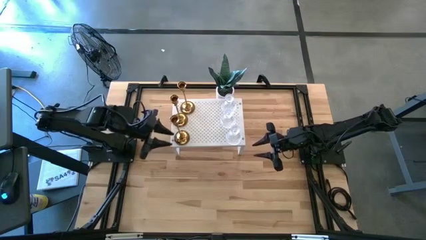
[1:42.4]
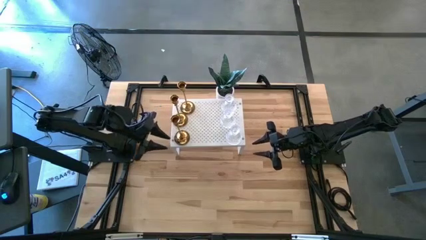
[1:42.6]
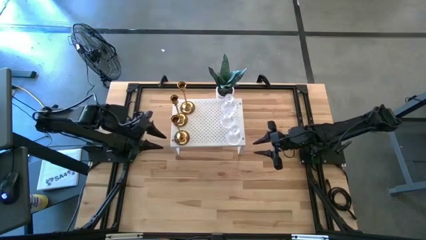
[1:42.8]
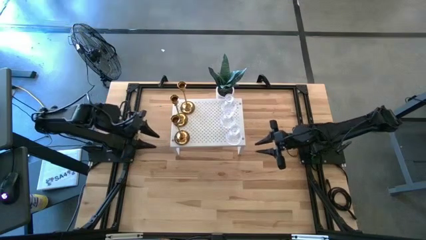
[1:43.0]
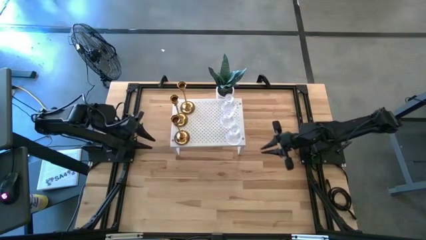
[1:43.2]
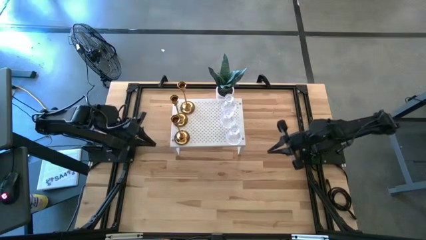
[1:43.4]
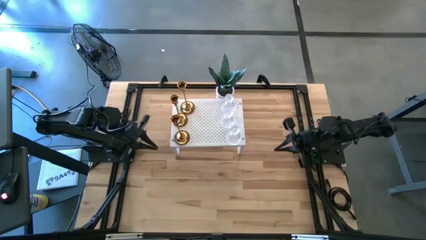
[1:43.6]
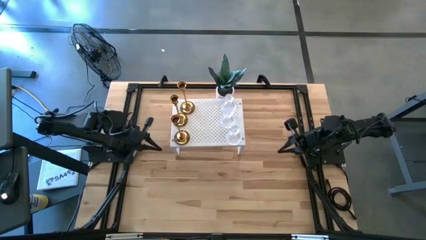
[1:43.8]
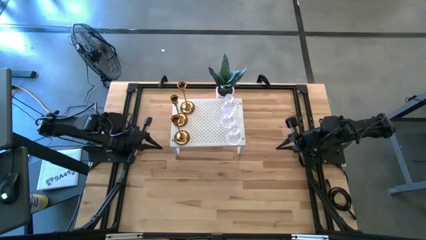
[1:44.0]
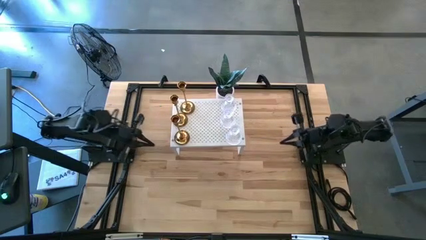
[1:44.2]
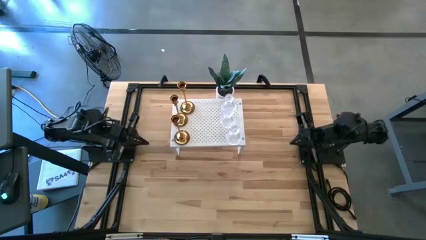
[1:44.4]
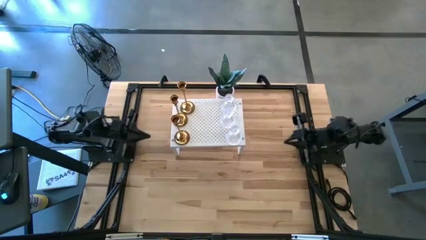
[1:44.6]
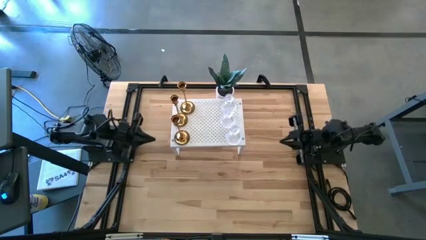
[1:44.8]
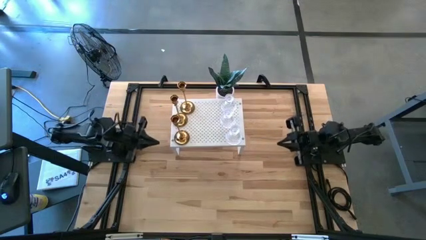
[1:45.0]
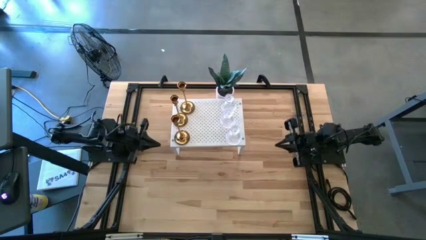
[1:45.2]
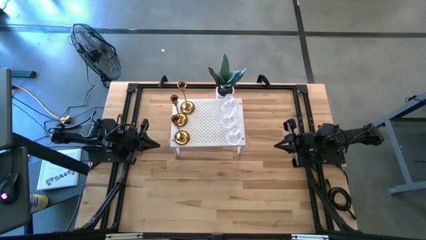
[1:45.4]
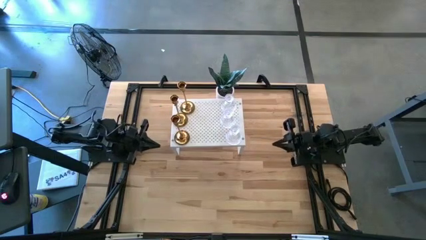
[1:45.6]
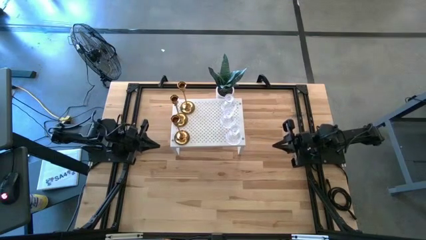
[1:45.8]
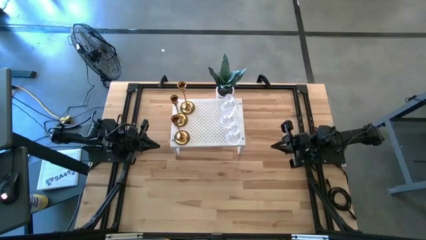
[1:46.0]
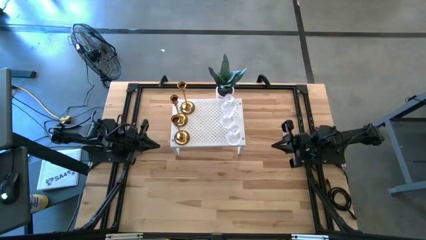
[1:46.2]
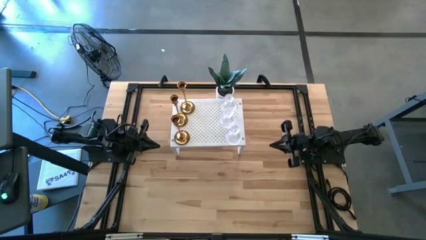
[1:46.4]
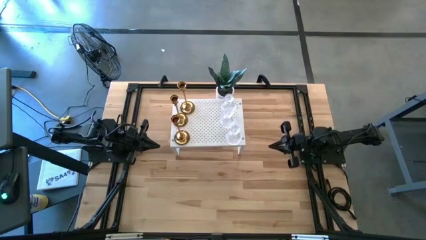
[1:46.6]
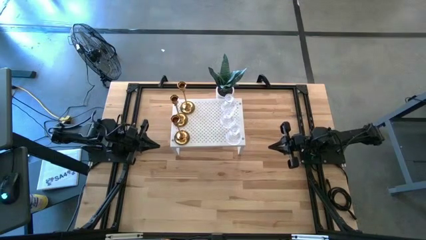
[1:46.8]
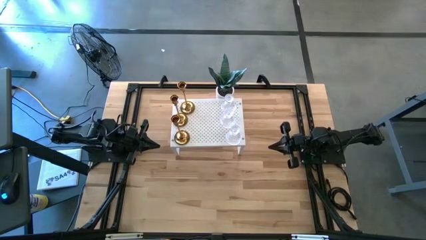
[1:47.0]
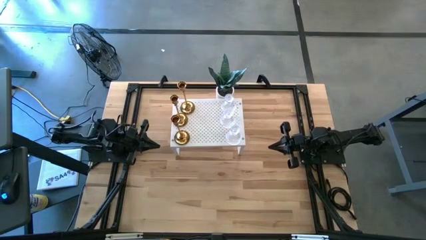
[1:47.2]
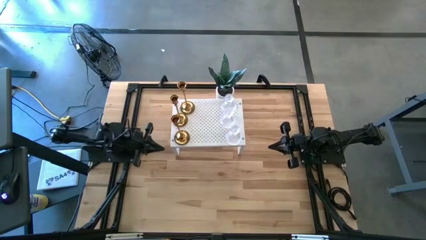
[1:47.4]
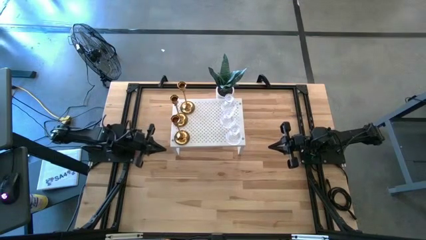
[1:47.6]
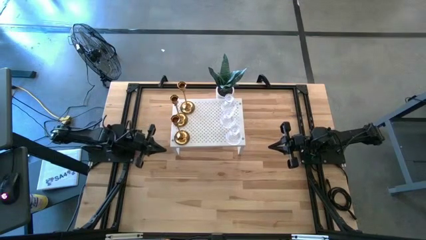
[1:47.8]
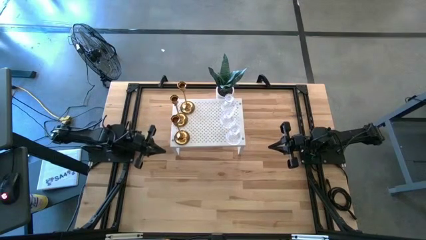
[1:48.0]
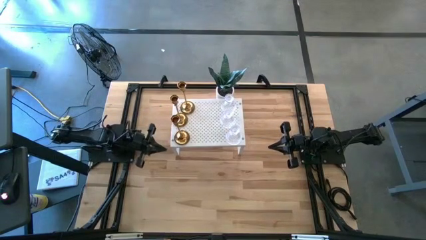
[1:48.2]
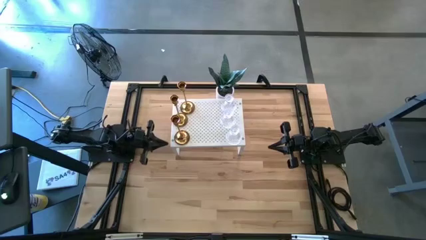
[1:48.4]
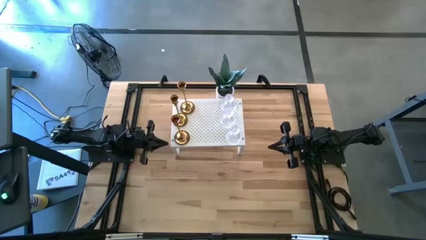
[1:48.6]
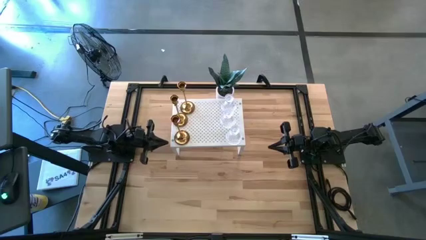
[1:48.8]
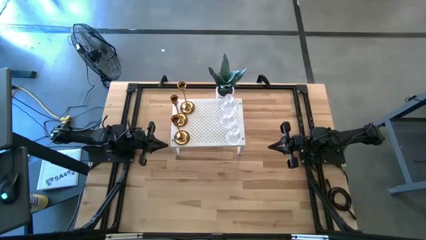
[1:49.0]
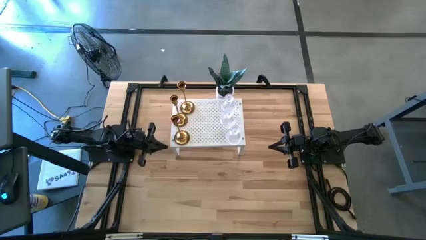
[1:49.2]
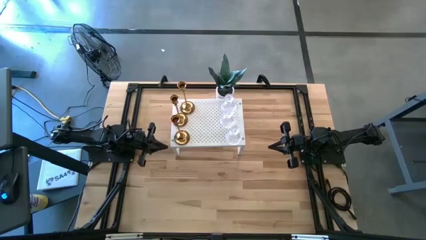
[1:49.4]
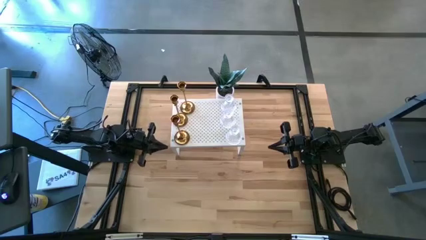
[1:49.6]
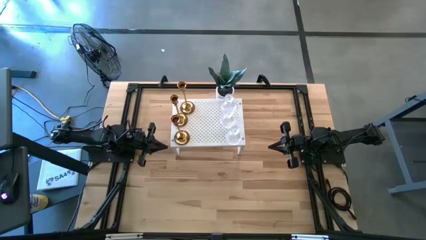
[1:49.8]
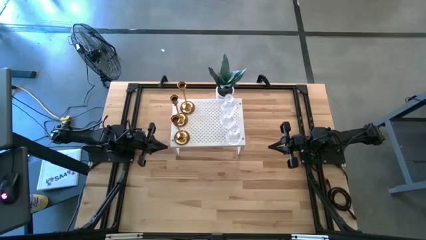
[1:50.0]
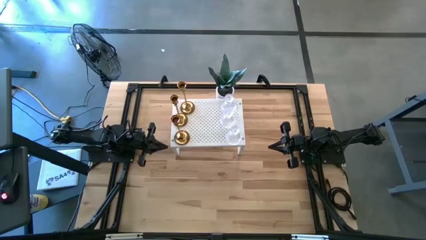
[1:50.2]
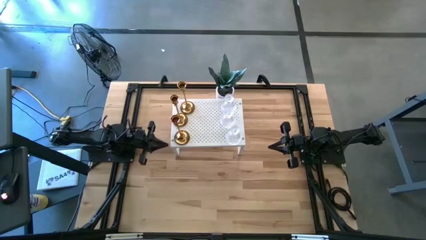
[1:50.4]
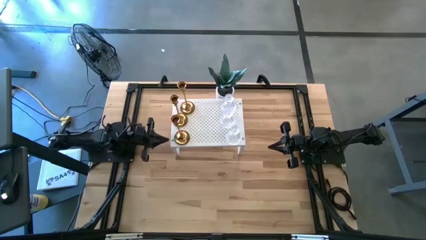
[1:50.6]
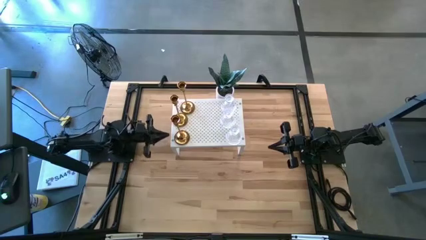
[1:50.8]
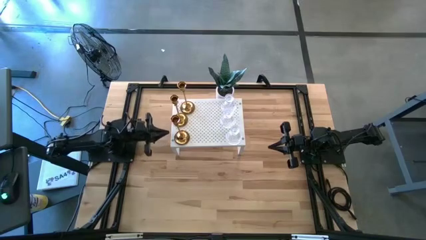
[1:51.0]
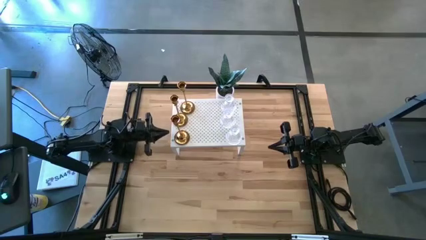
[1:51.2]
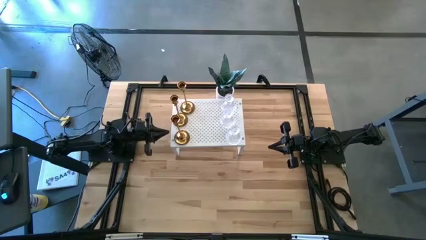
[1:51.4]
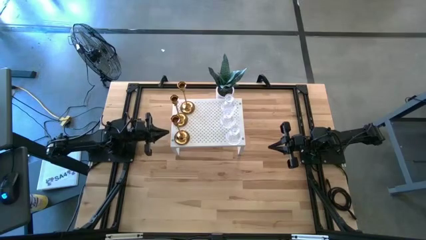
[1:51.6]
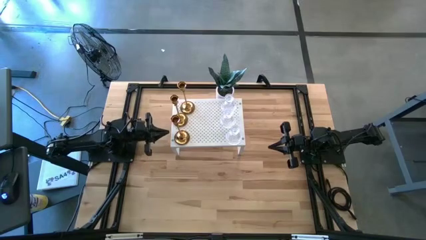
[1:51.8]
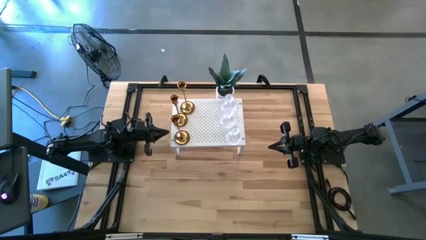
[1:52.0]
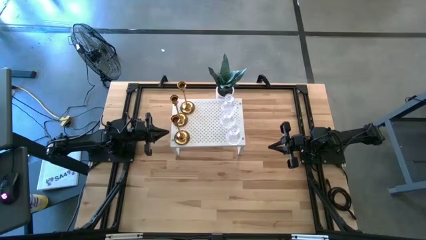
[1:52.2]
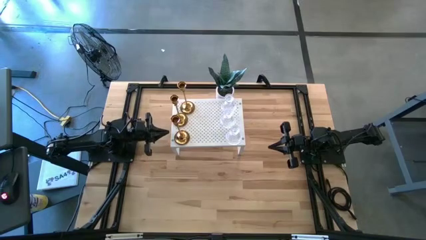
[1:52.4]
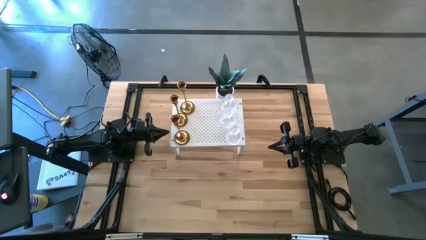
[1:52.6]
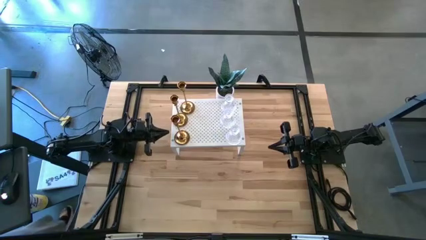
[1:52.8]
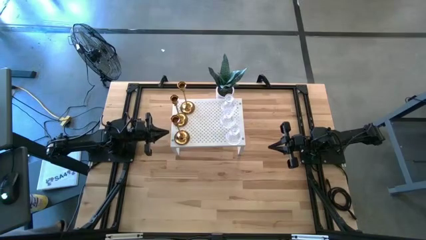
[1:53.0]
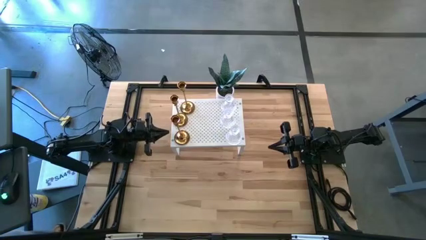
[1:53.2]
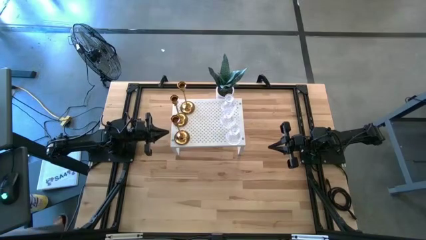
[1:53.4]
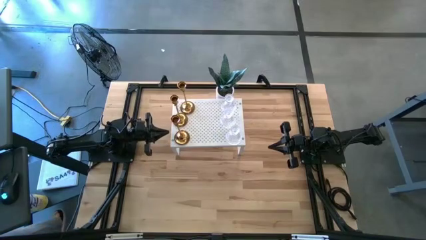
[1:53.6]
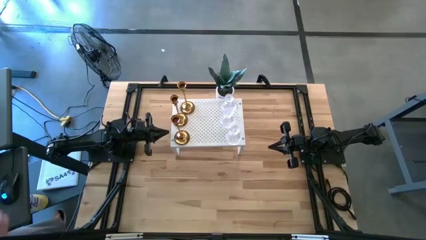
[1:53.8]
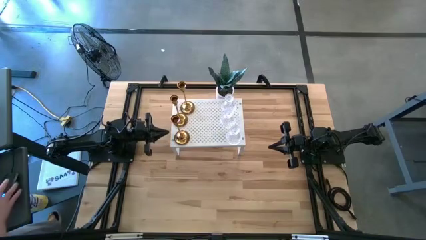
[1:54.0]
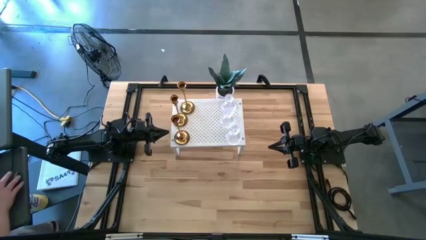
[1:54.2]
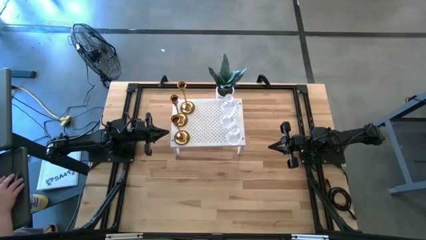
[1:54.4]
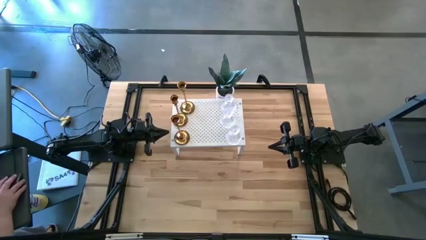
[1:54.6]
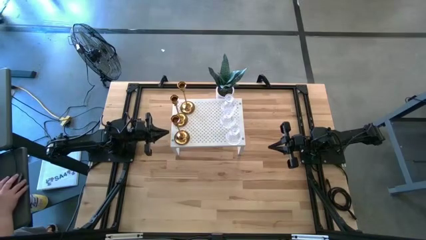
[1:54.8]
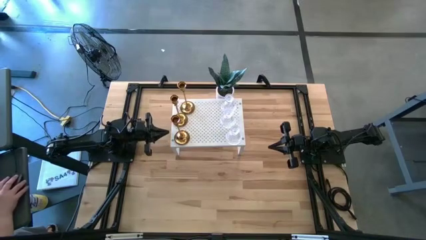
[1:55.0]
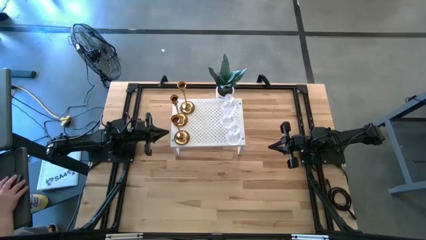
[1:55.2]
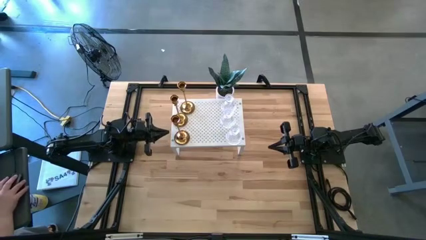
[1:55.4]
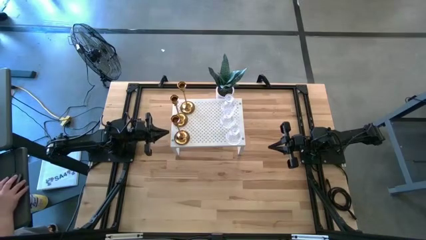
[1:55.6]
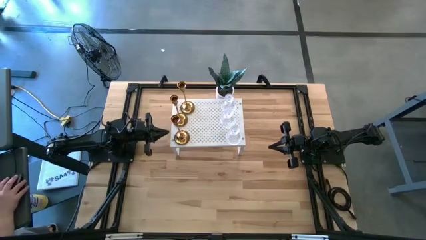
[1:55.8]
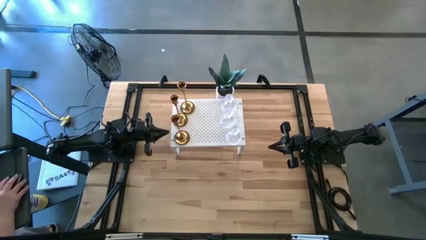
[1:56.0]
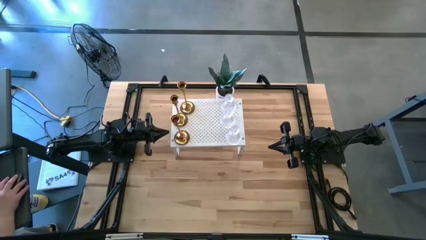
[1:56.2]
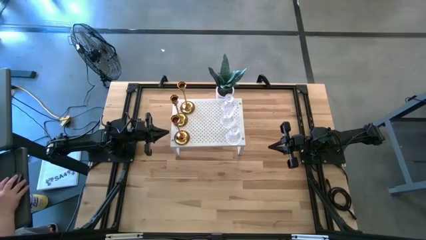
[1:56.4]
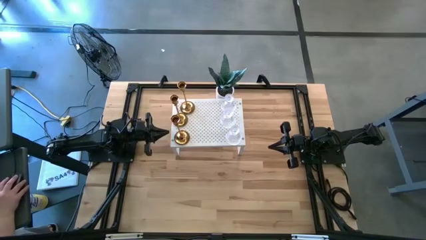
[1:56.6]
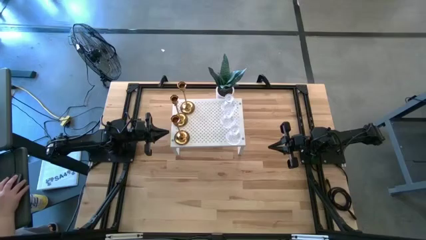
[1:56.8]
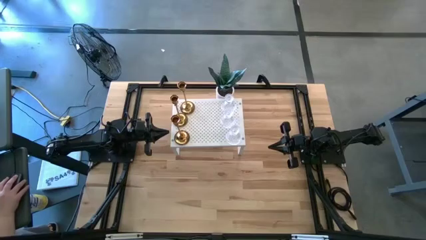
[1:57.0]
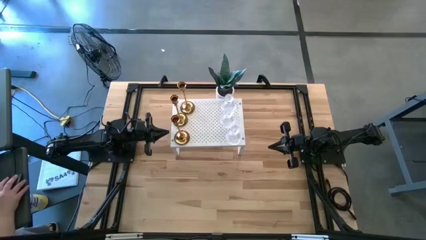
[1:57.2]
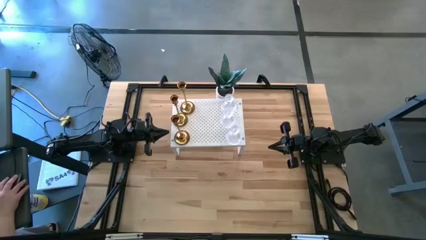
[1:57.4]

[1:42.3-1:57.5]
Task: Pick & Place candle stick holders
Return to Home Position
